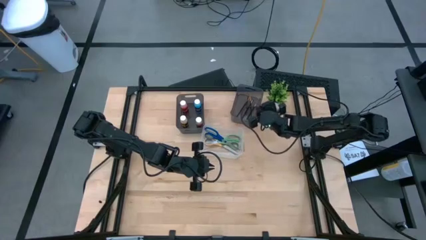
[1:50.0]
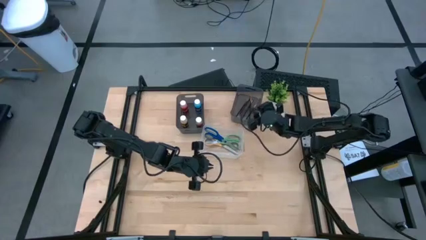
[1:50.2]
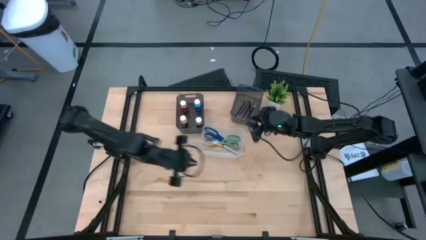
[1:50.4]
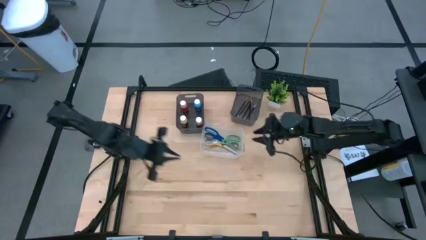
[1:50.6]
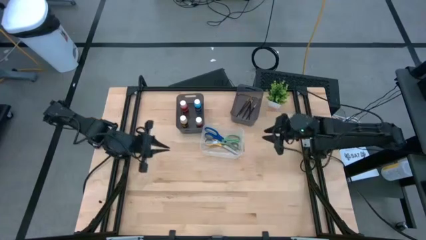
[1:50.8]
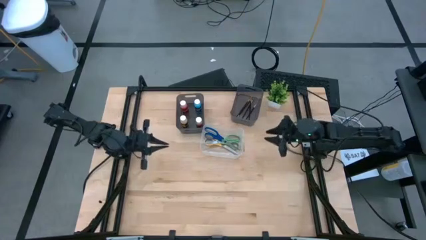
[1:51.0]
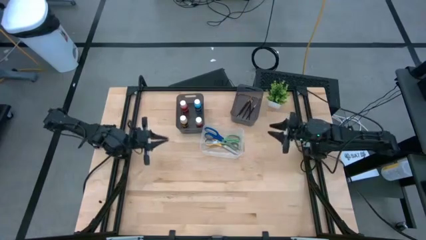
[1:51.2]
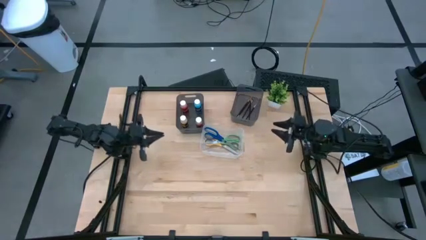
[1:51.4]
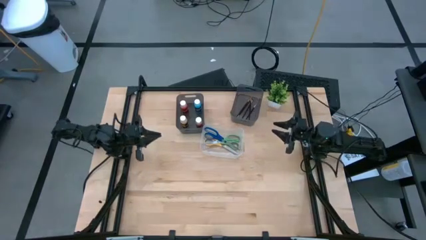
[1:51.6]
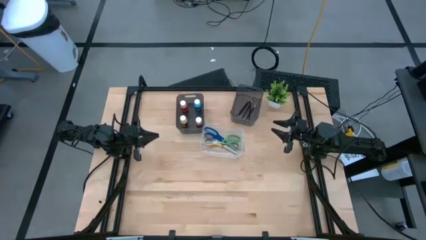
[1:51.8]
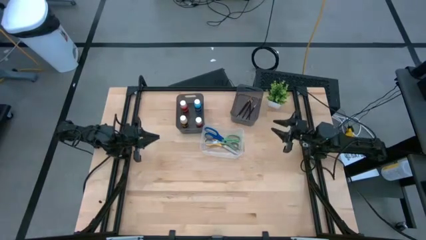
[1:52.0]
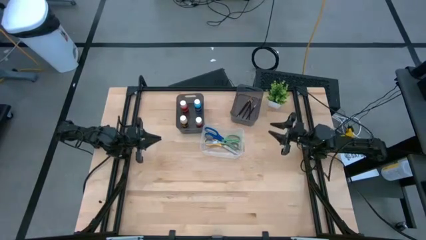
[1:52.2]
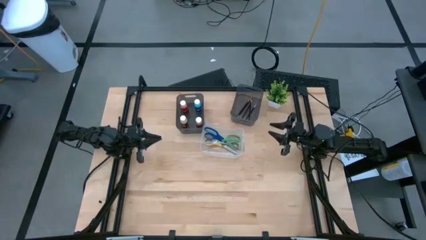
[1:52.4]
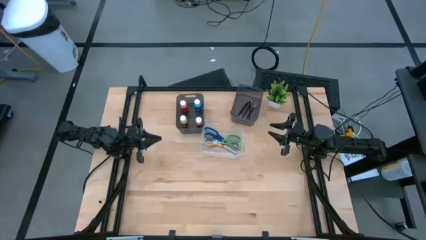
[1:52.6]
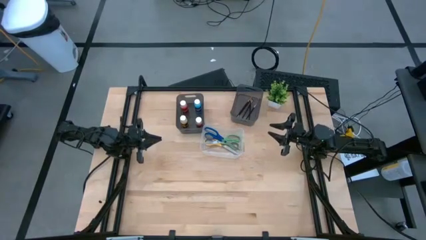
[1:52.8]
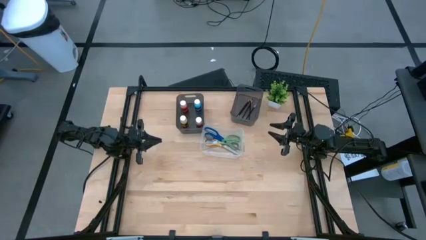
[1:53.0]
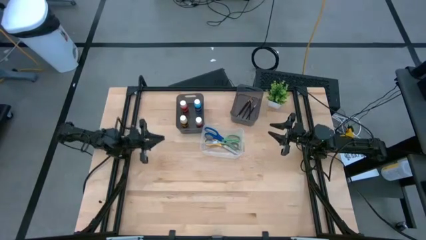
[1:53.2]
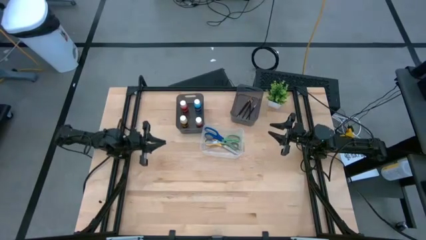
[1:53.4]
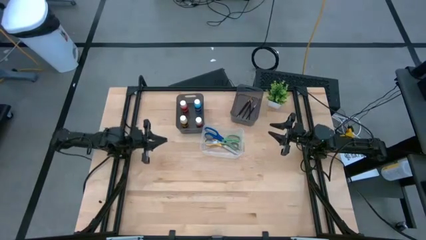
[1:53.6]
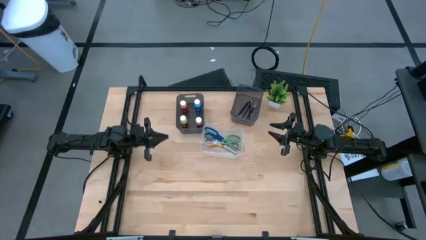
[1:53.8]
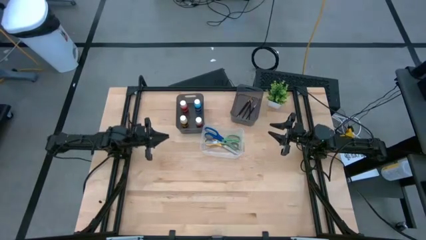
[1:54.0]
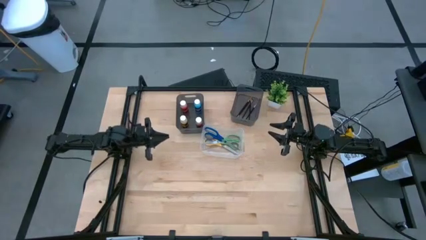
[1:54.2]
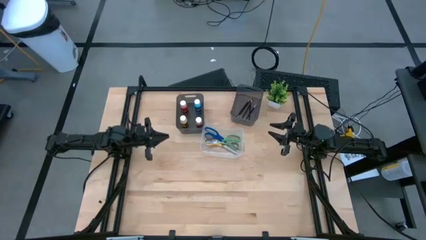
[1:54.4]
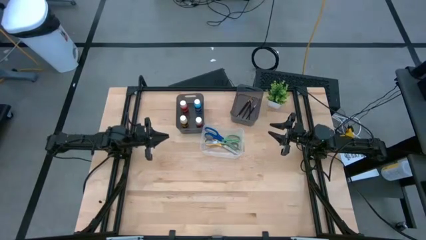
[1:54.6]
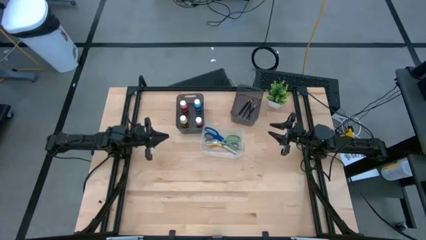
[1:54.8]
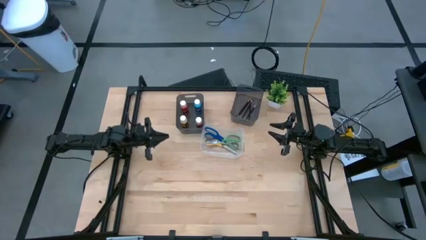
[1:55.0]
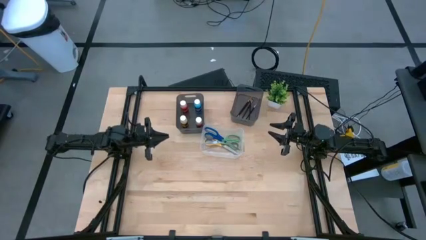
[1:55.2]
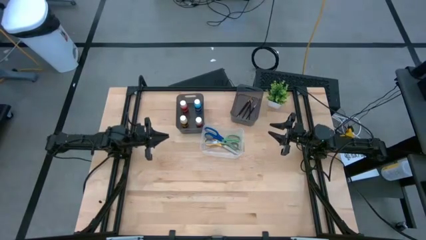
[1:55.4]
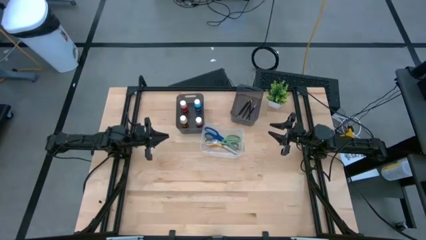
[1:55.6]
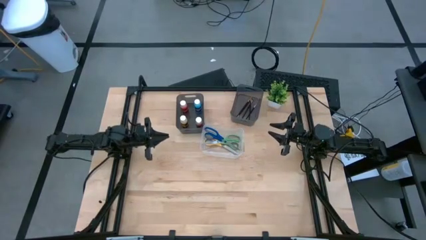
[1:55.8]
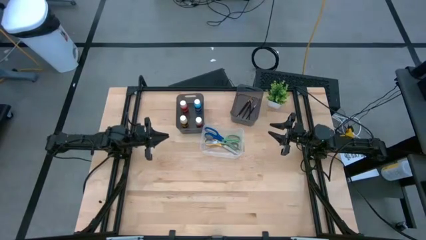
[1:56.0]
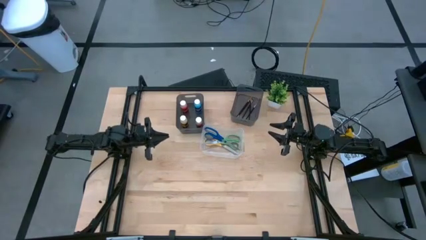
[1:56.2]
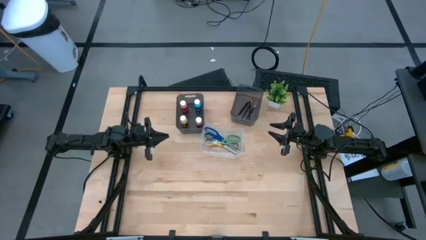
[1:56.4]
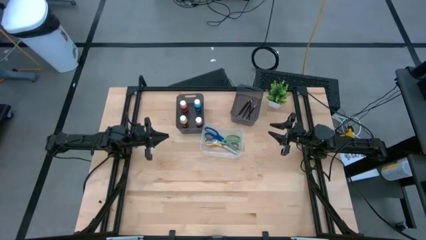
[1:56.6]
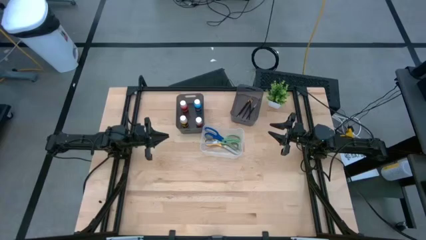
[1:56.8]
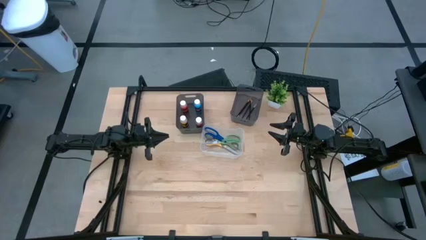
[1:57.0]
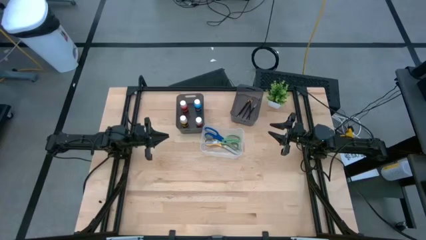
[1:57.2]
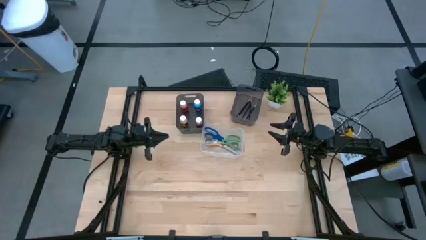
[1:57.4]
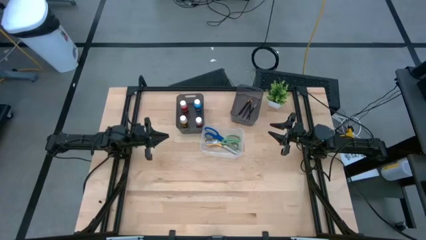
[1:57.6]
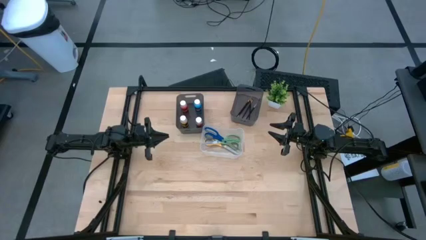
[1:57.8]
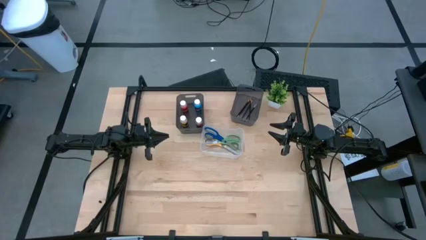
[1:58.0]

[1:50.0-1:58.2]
Task: Pick & Place Paint Supplies
Return to Home Position

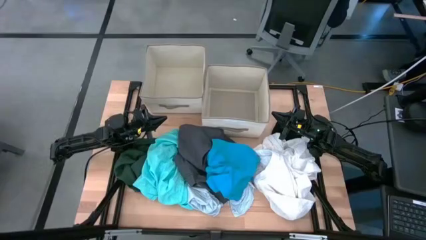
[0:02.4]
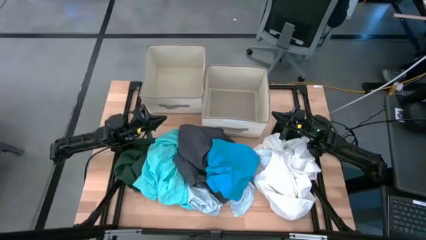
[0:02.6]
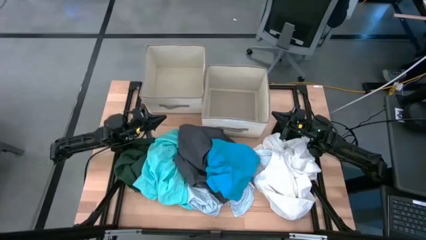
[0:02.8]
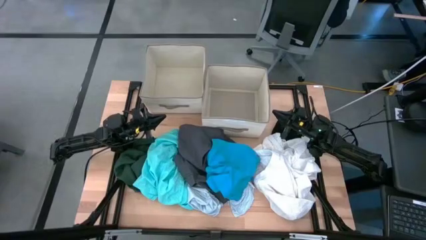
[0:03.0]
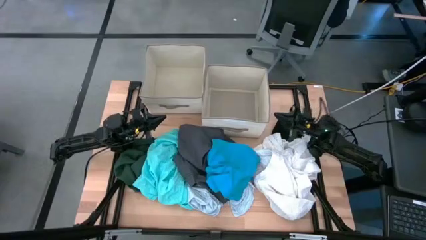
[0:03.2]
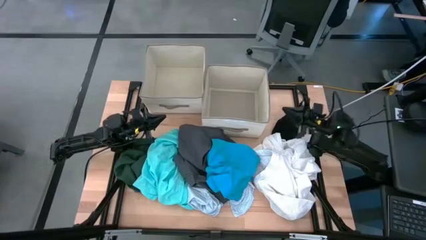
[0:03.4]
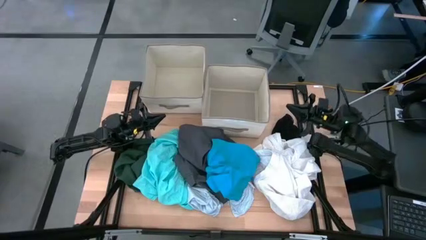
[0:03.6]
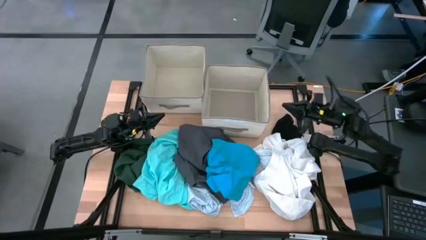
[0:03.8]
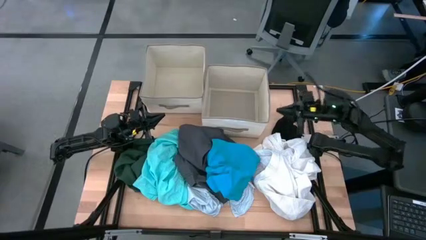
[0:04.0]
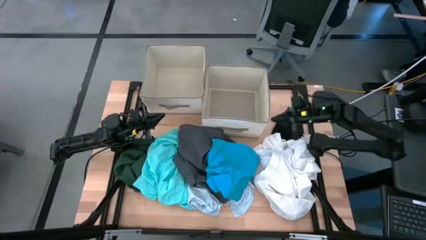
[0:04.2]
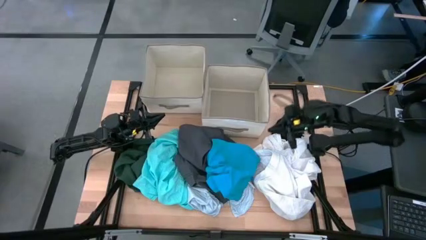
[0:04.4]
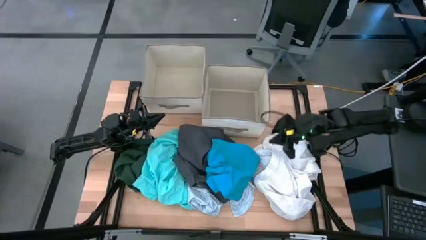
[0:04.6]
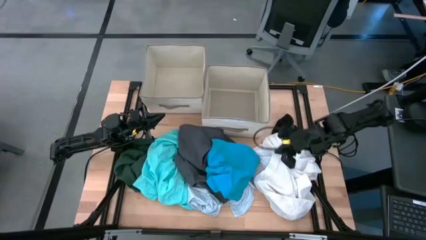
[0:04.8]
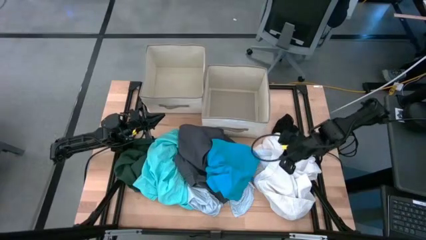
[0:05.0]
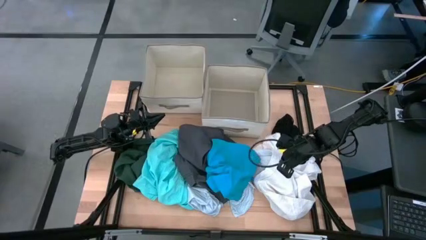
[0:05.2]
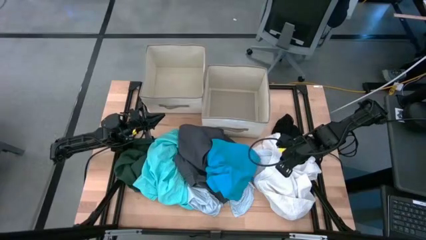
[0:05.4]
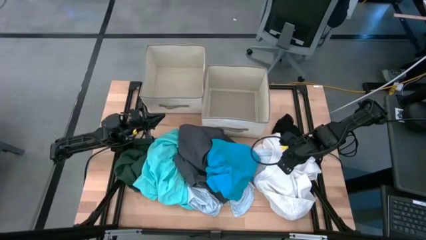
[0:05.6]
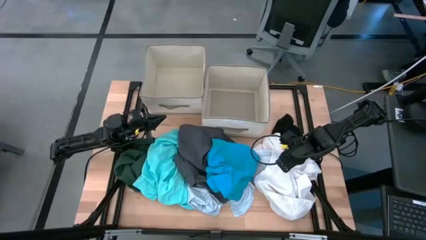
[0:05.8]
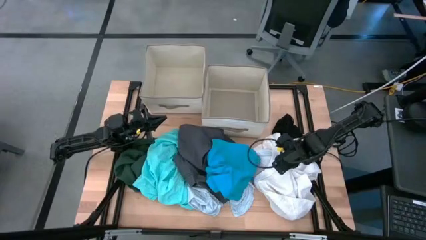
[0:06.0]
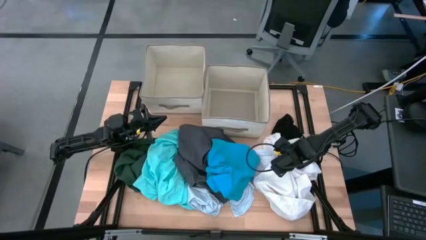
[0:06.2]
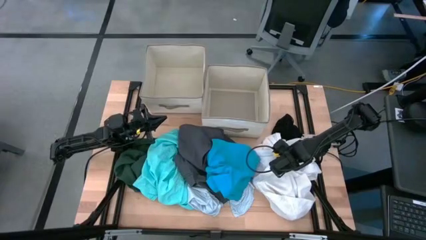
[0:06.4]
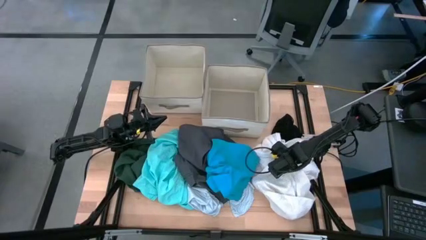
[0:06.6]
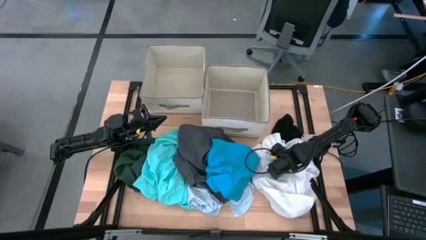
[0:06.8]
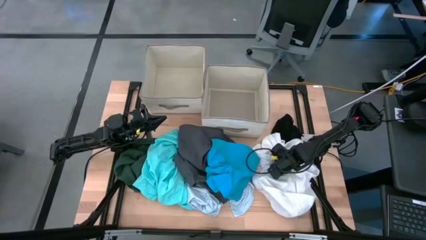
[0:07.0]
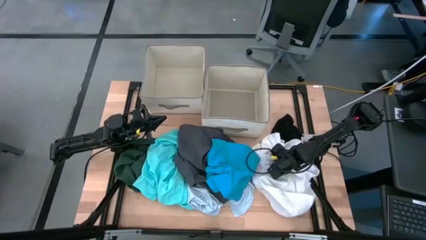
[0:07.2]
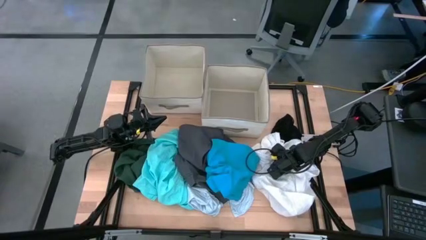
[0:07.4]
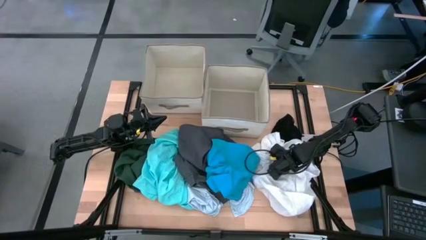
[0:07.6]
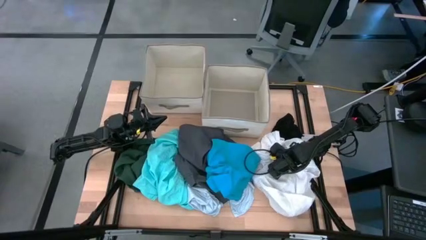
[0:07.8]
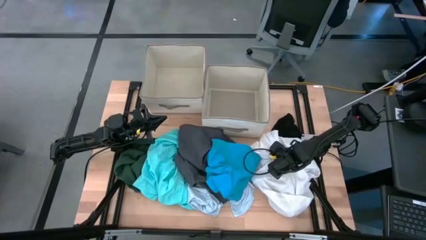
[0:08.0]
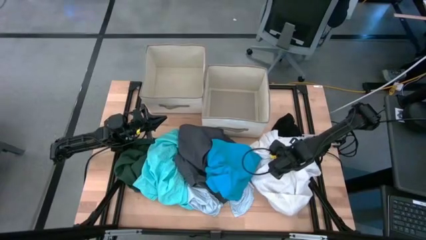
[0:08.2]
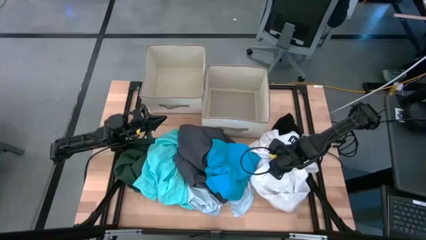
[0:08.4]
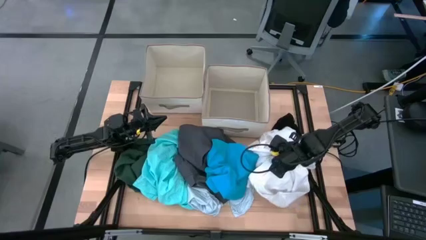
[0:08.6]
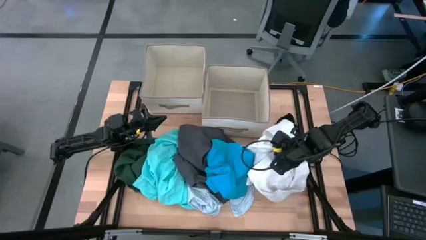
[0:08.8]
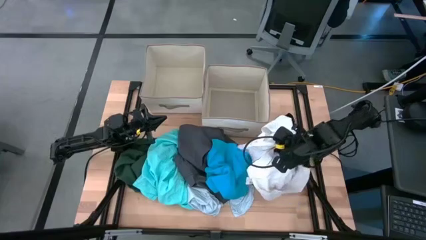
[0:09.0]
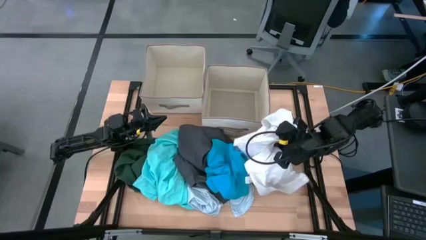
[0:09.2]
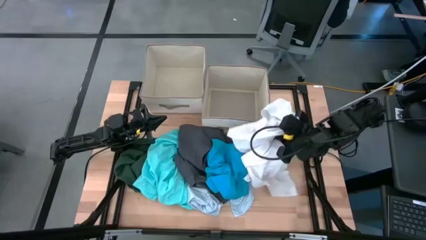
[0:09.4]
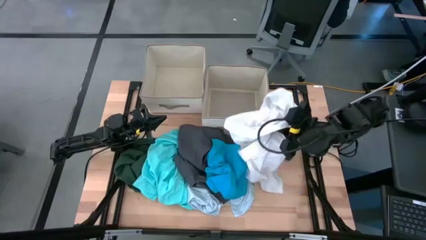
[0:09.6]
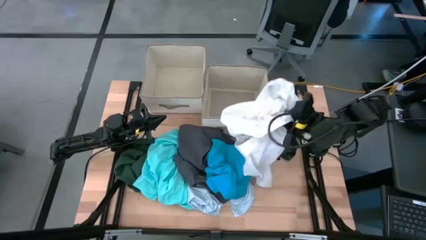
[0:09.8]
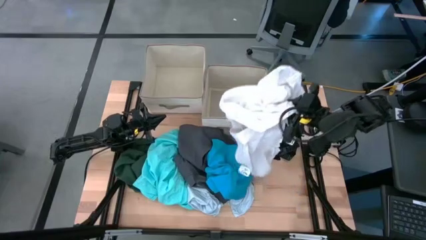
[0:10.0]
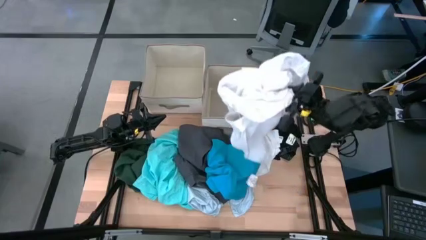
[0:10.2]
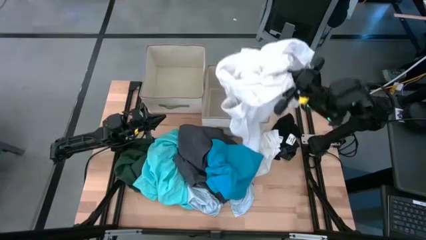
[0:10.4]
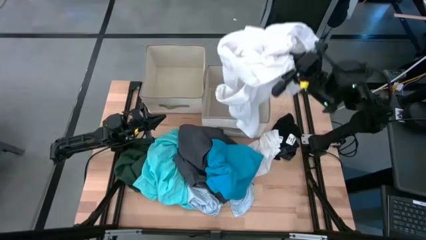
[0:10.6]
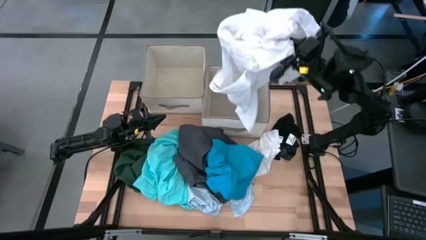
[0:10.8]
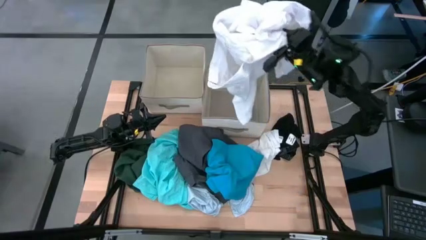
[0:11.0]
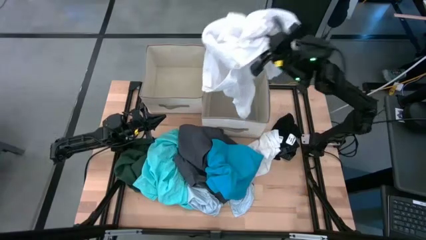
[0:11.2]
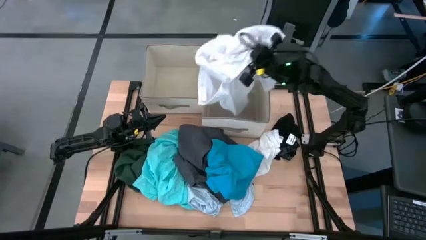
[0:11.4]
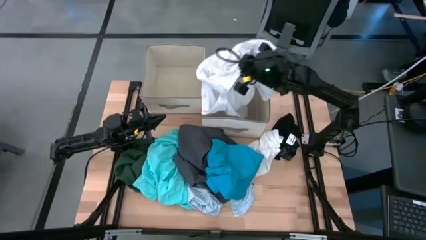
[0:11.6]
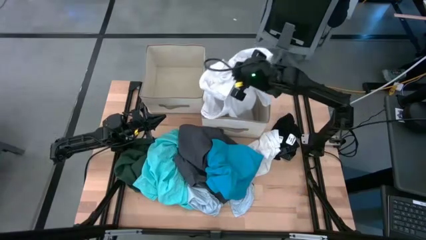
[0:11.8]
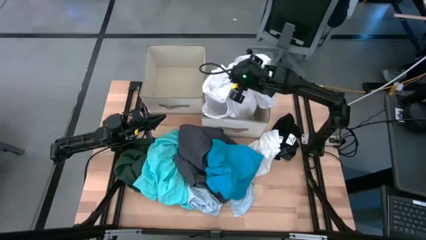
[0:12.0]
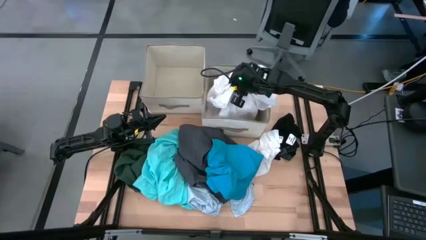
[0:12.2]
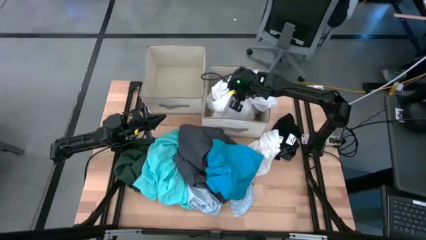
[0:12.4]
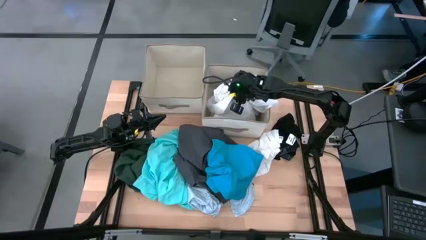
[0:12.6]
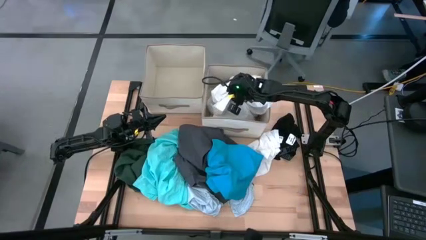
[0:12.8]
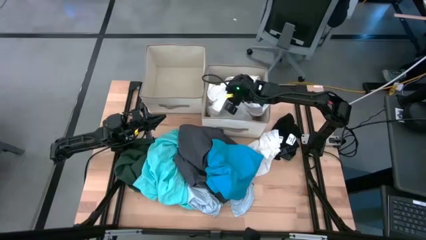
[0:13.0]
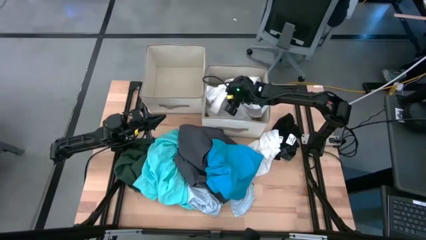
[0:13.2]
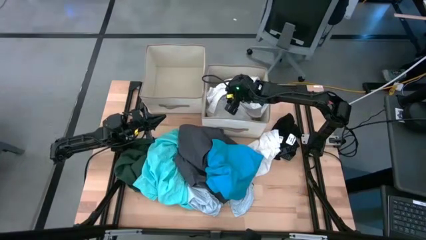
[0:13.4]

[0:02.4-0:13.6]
Task: Sort clothes
Put the white shirt into the right laundry organizer
